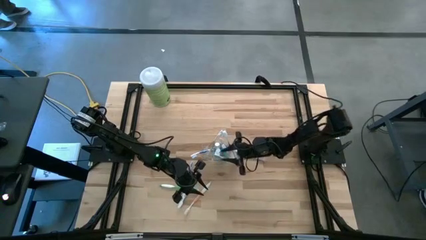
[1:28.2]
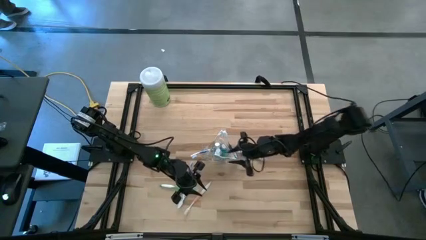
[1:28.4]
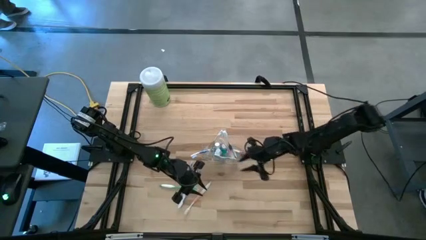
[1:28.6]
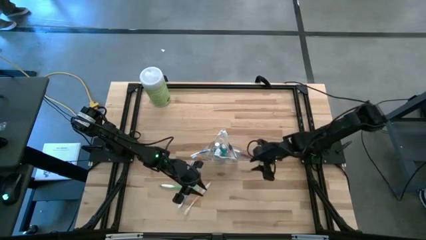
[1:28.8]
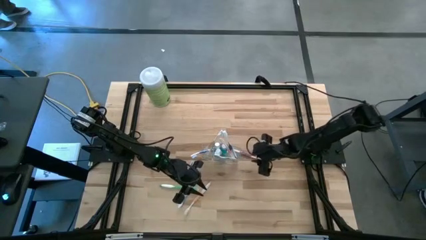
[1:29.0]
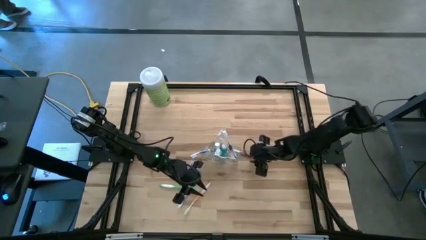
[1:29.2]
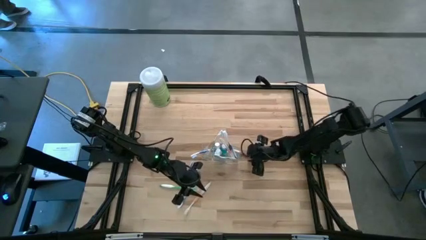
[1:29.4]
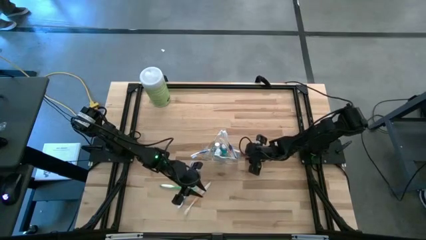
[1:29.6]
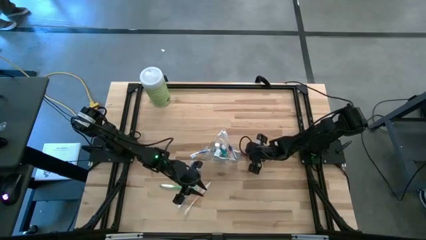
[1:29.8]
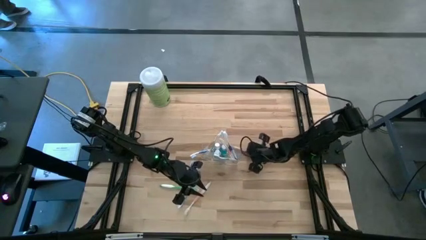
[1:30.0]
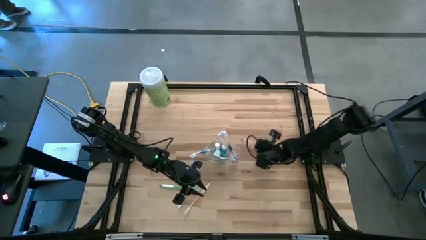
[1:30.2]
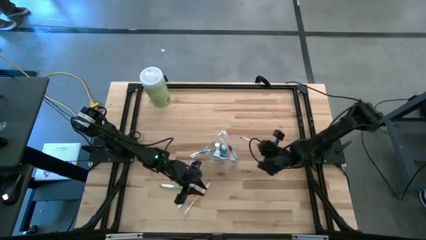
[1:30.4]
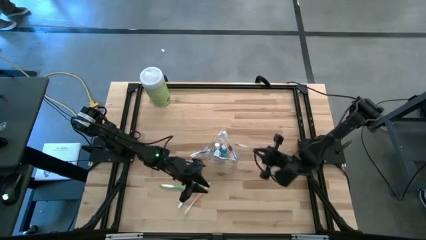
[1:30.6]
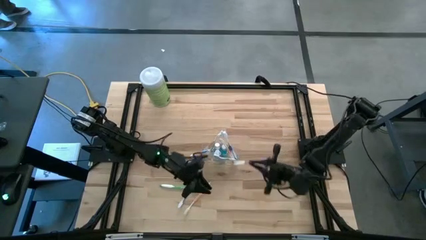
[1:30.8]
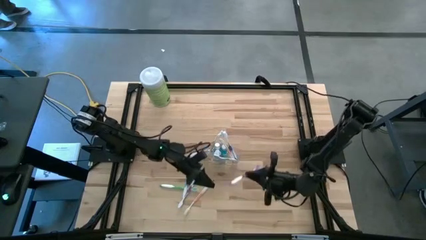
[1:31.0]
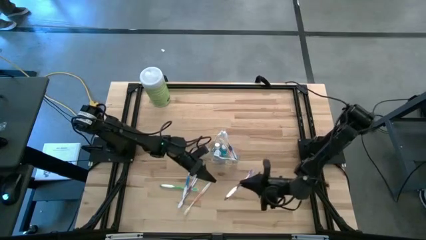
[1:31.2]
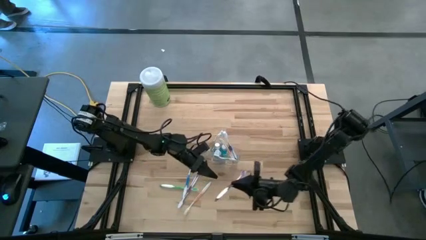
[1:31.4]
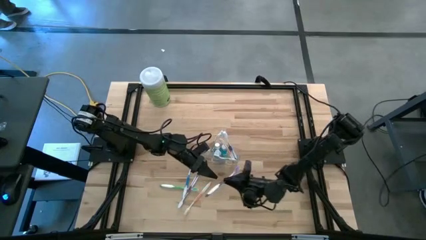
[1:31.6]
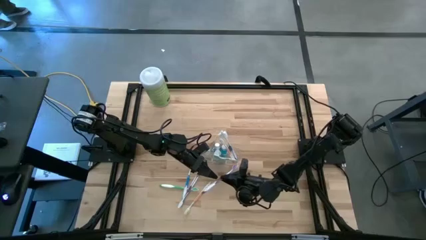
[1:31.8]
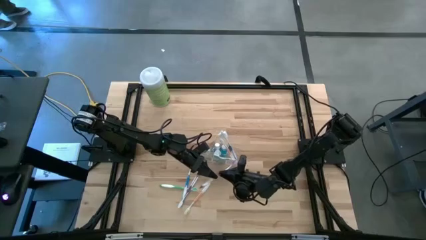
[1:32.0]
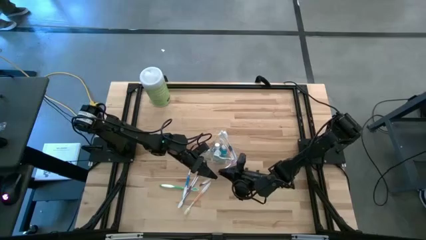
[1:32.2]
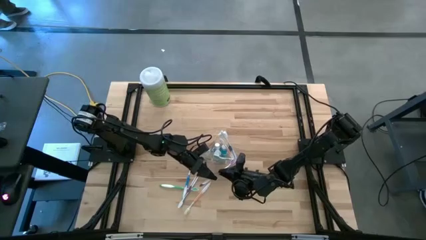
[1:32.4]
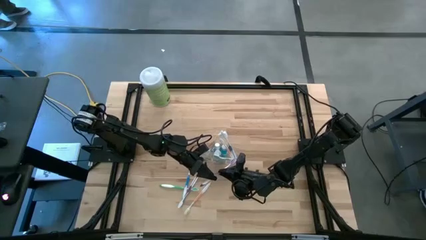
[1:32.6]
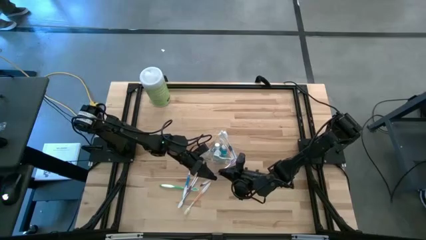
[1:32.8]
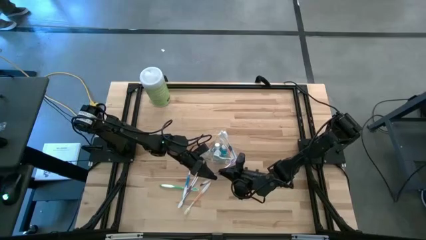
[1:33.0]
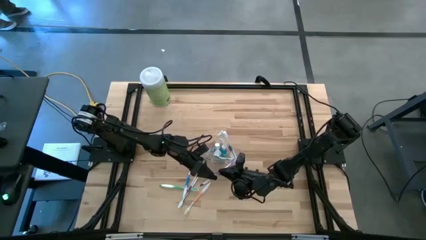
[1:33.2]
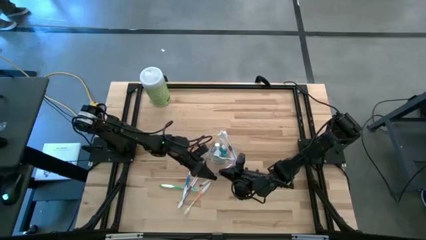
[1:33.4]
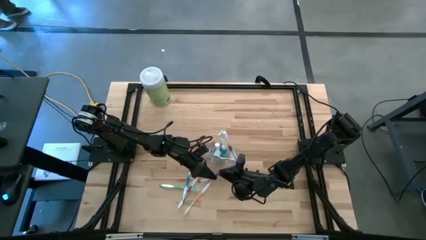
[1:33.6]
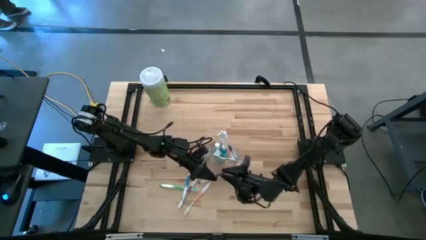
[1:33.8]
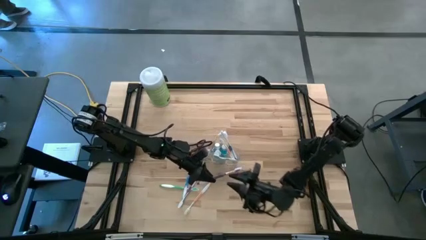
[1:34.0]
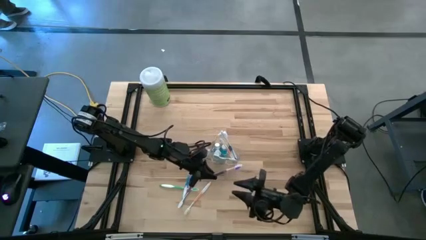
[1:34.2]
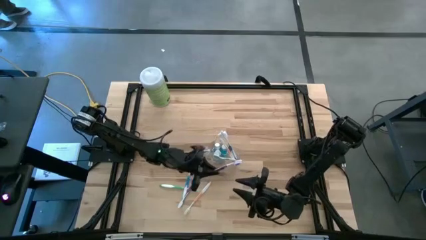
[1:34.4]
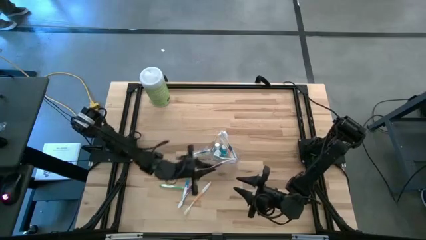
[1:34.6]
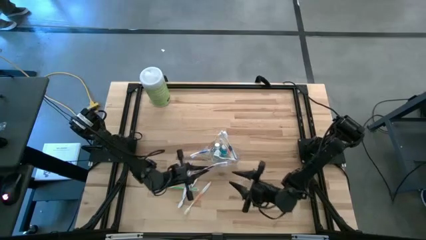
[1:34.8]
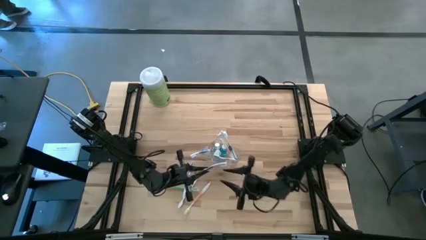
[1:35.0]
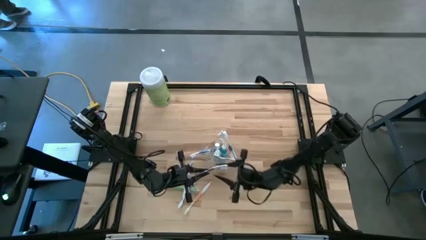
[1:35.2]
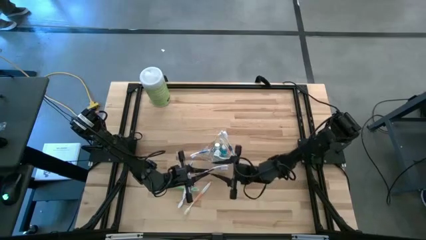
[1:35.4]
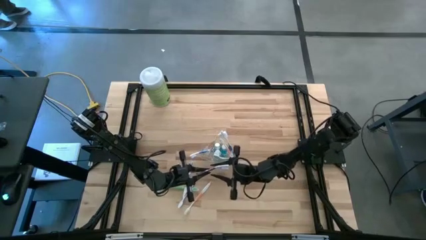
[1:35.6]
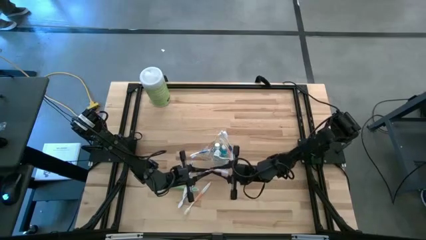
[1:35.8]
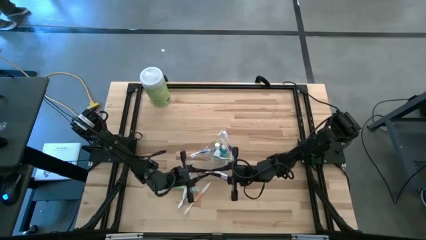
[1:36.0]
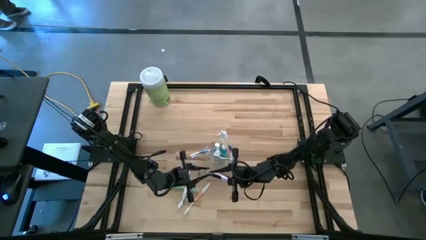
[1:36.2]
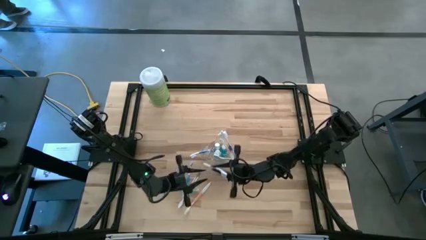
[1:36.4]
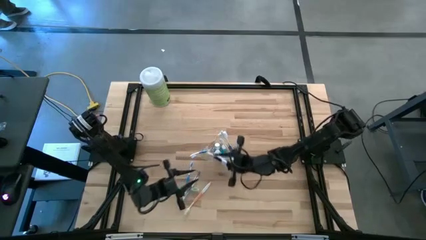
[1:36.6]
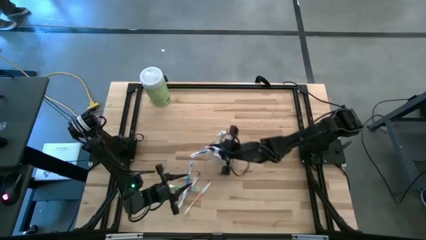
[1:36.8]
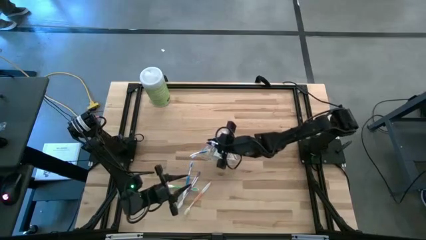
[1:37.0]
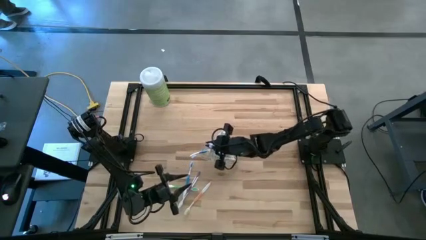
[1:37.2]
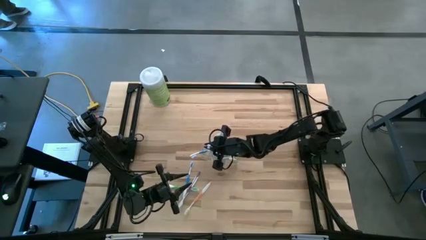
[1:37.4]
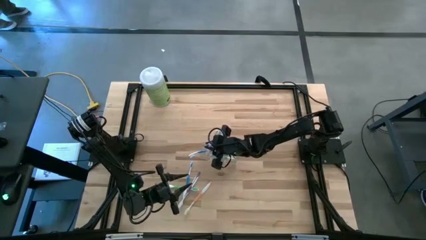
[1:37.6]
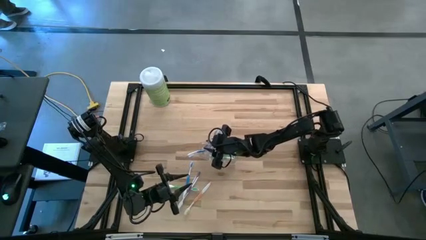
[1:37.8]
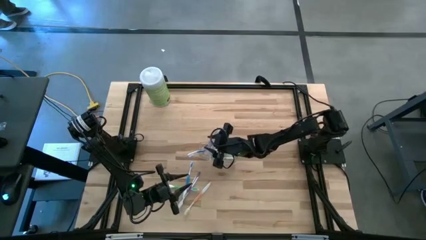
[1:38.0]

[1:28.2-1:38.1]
Task: Pick & Place toothbrushing station
Put the right violet toothbrush into the transparent organizer

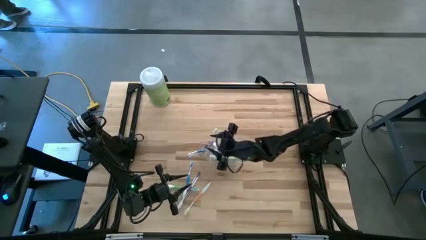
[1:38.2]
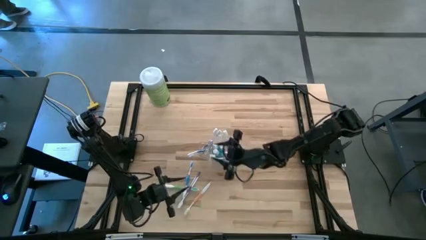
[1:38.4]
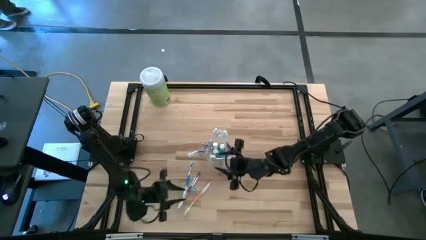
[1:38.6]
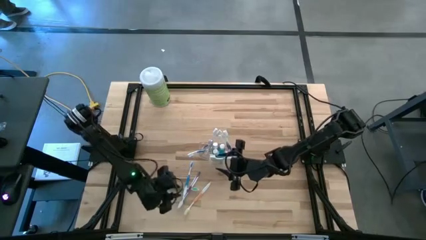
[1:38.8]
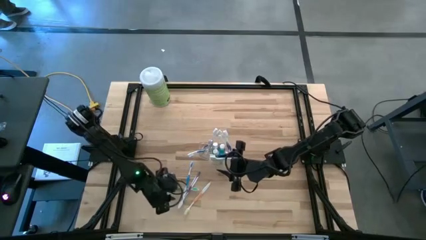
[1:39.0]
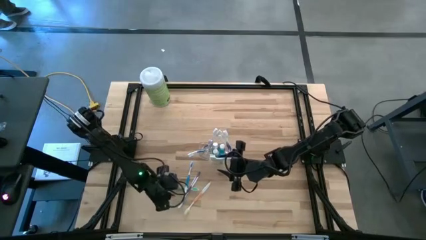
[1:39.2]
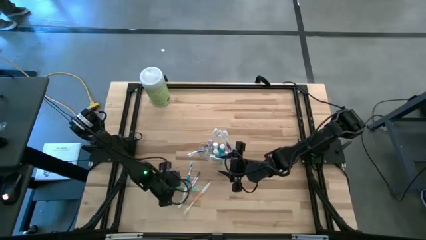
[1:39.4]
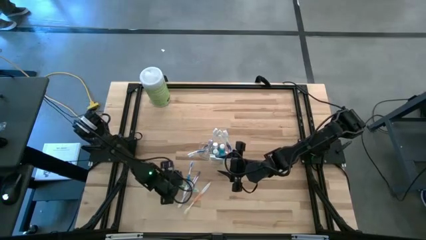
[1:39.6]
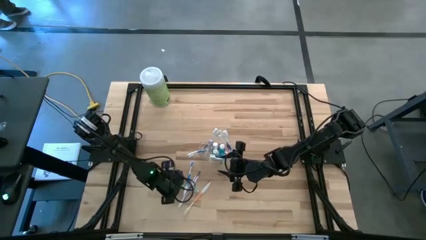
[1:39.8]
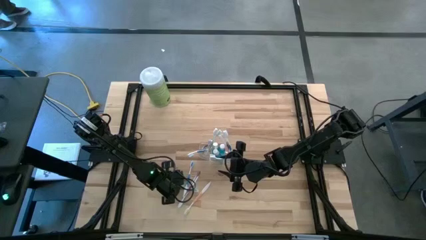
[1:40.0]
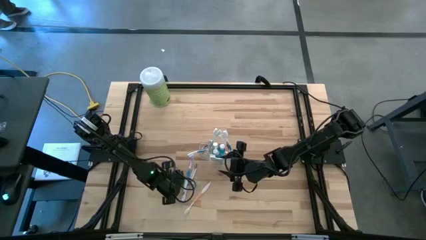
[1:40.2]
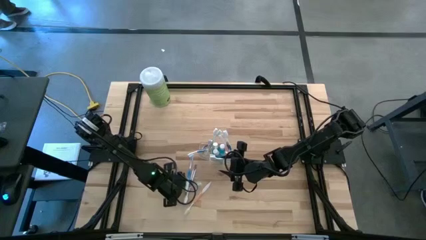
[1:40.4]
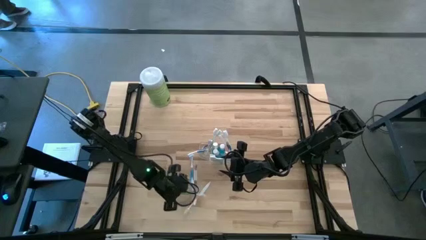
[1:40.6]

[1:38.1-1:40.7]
Put the green toothbrush into the transparent organizer

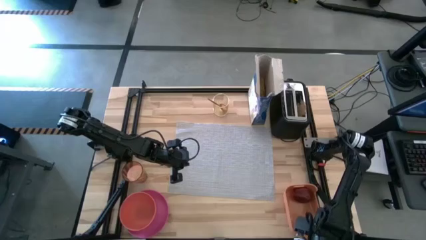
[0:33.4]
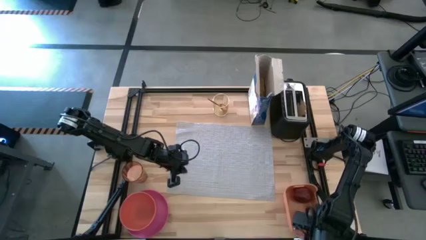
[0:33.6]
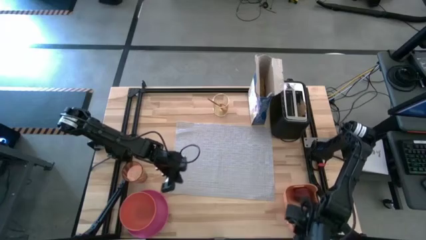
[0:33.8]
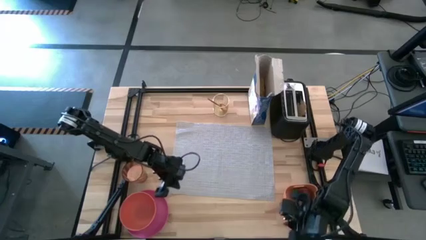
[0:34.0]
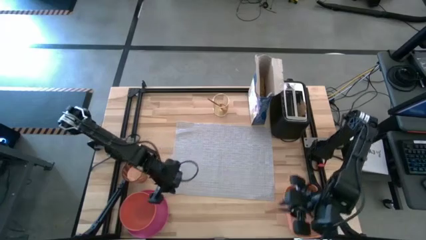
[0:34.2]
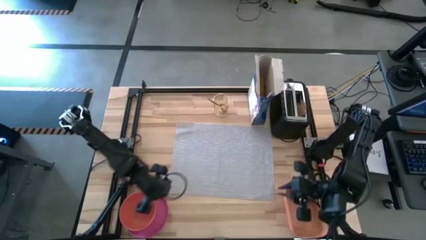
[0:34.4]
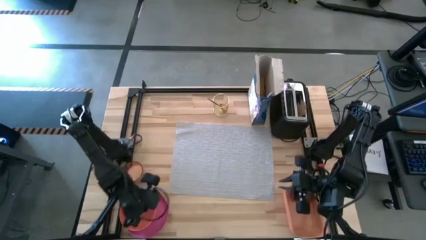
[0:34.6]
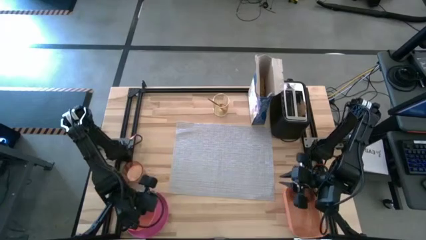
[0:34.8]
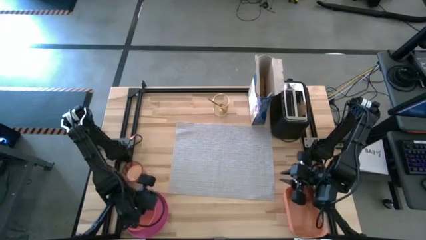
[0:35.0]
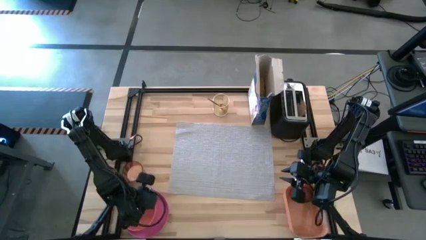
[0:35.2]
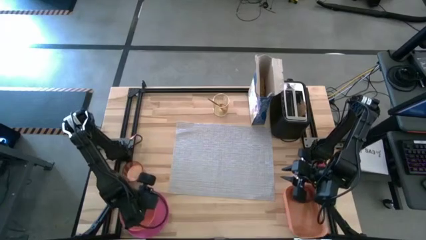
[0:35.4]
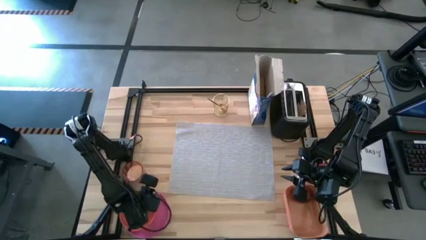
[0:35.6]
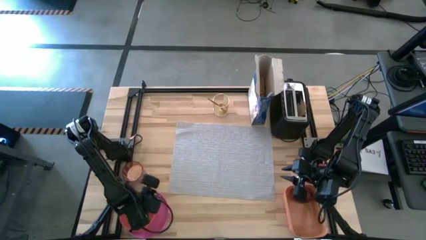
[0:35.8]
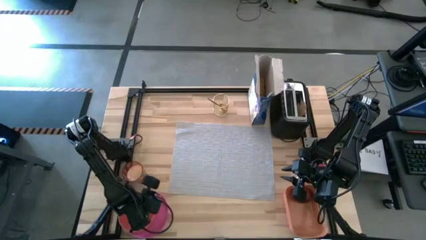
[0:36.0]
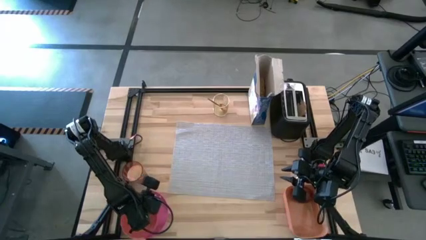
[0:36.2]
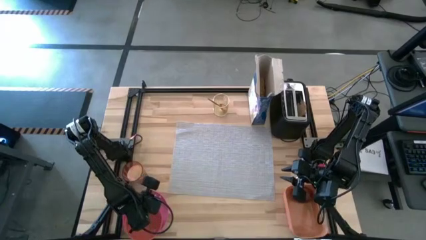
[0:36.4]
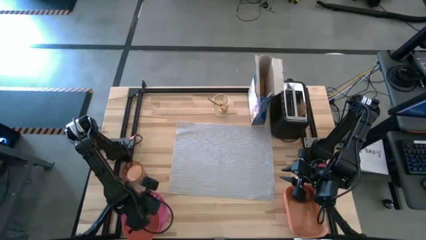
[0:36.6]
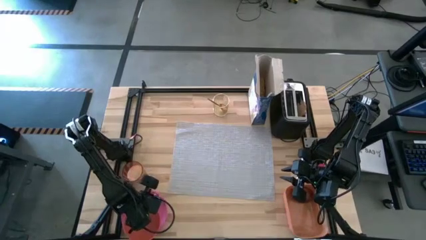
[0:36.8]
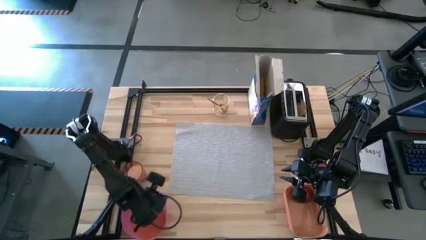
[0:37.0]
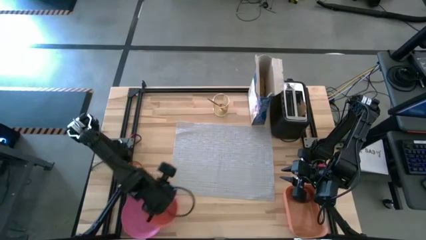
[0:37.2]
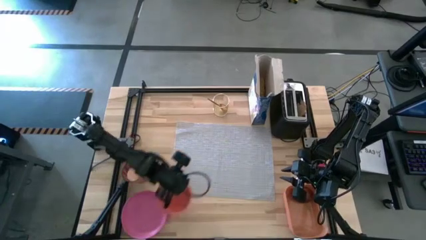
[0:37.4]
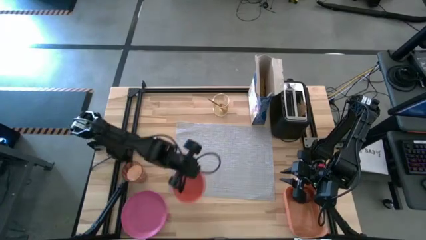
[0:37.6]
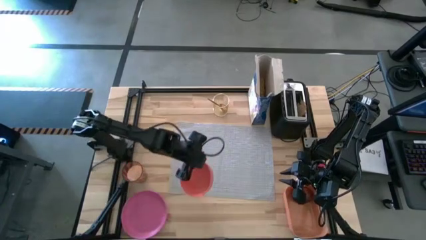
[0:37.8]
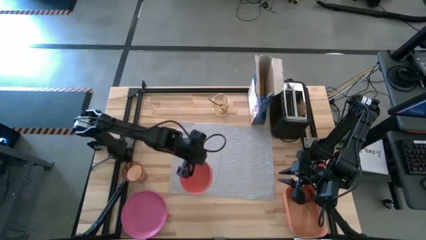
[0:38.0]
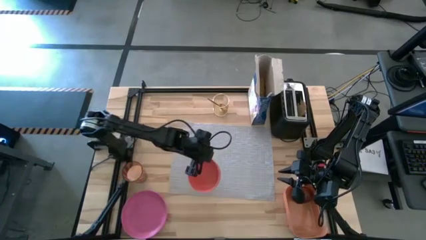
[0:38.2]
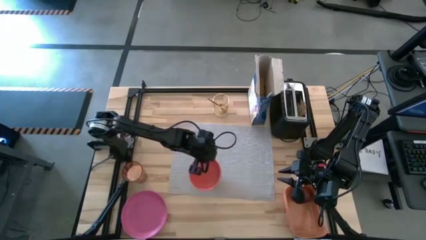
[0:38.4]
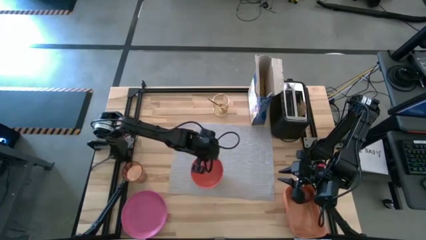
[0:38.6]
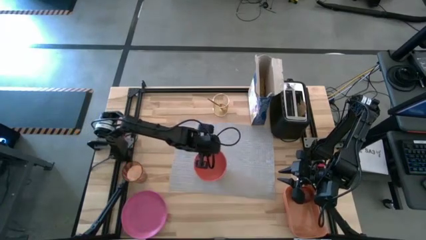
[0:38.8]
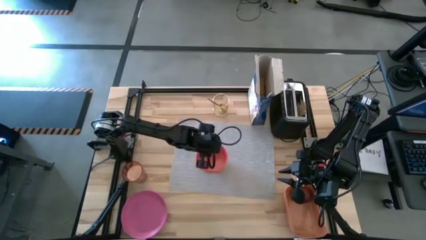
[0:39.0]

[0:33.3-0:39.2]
Task: Arrange a breakfast setting
Put the orange bowl to the center on the table mat
